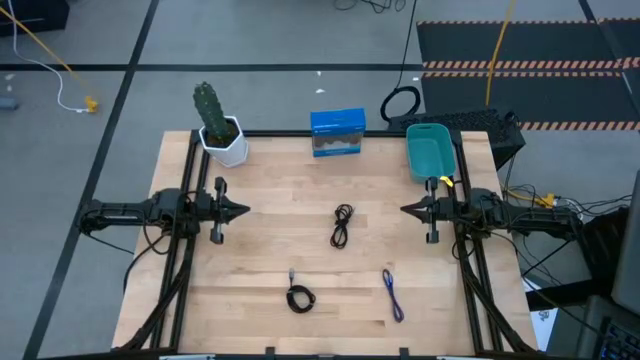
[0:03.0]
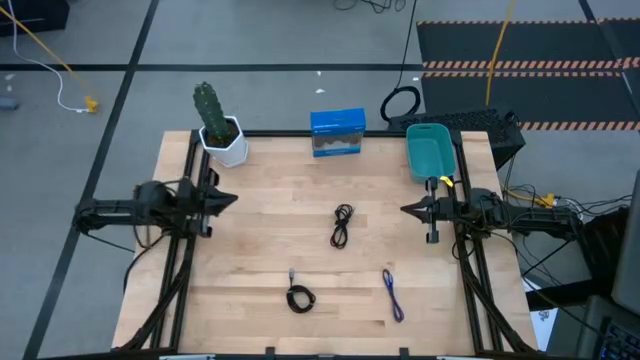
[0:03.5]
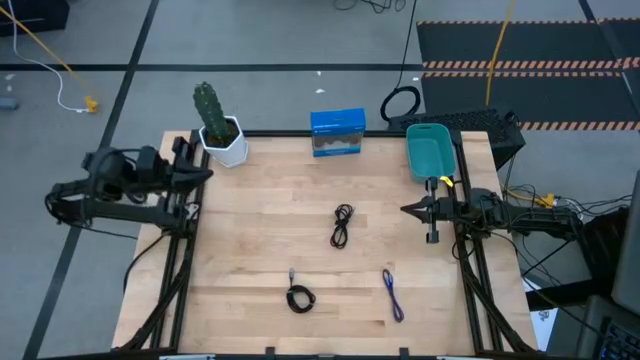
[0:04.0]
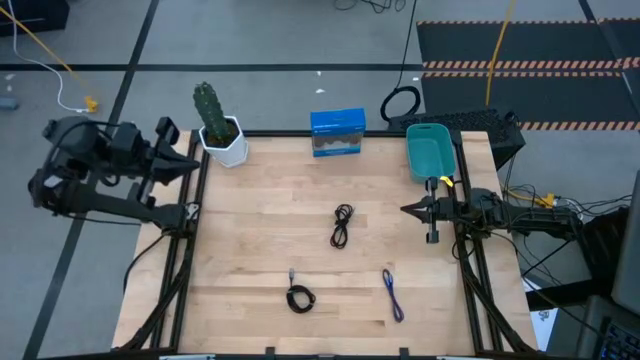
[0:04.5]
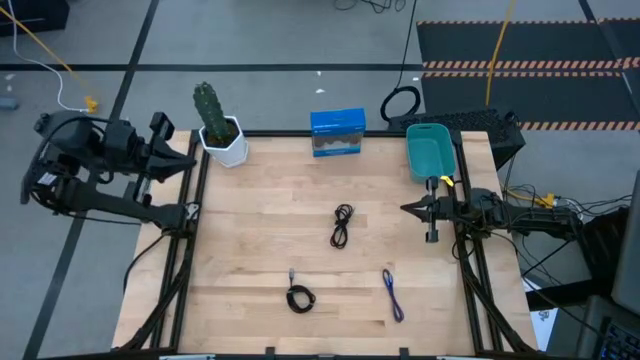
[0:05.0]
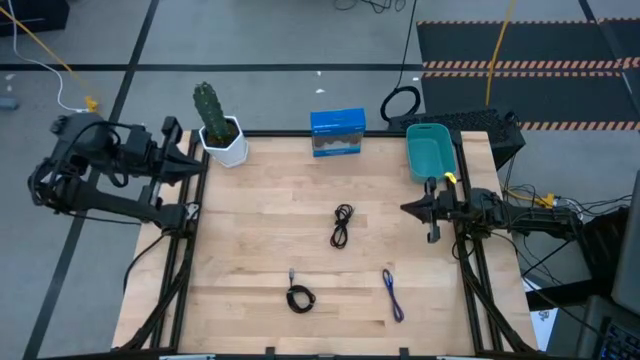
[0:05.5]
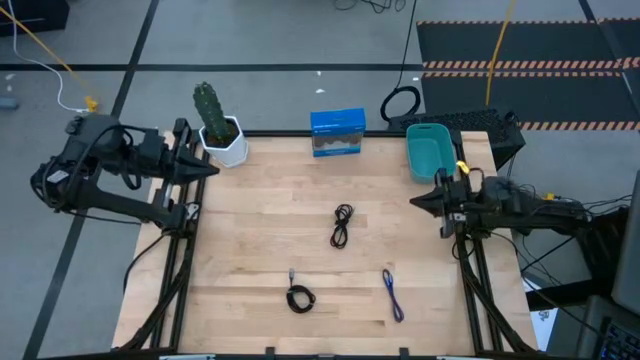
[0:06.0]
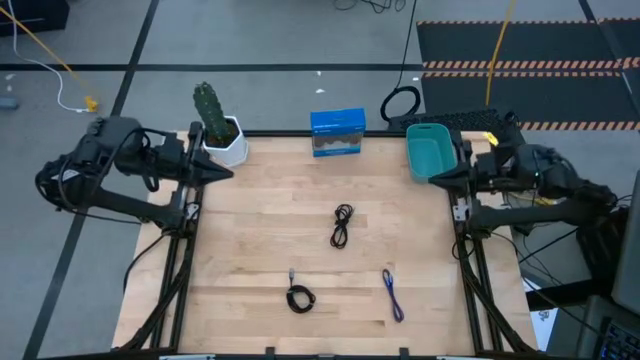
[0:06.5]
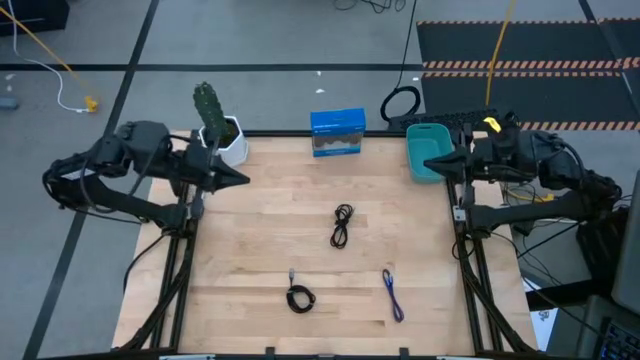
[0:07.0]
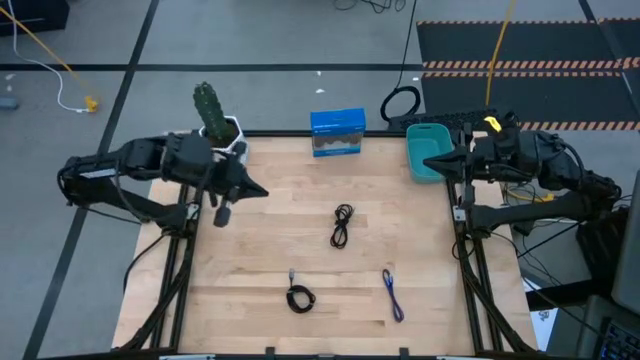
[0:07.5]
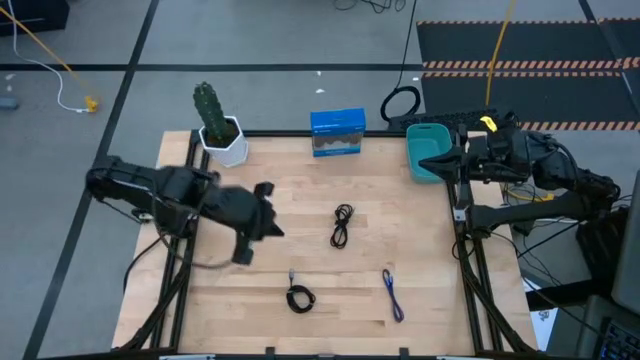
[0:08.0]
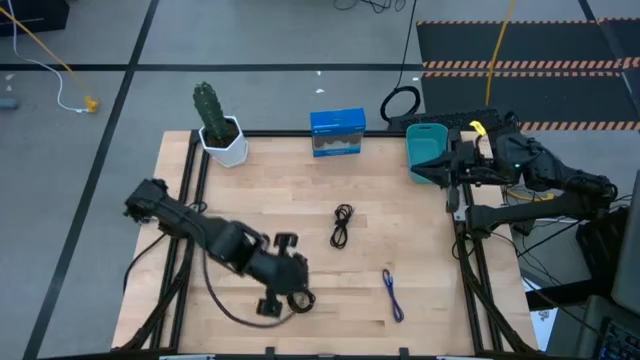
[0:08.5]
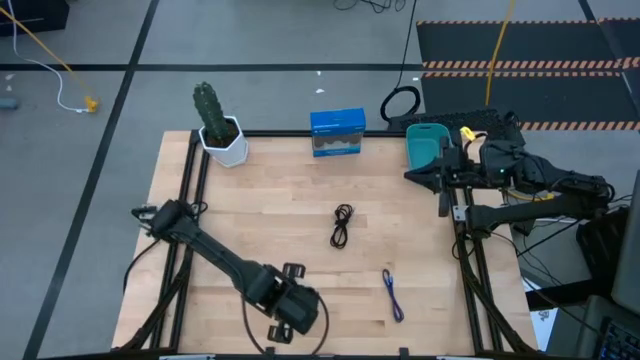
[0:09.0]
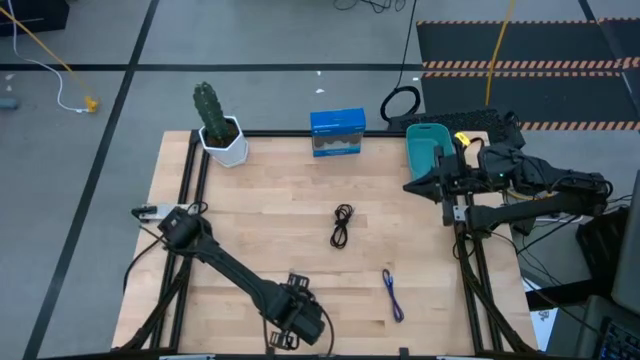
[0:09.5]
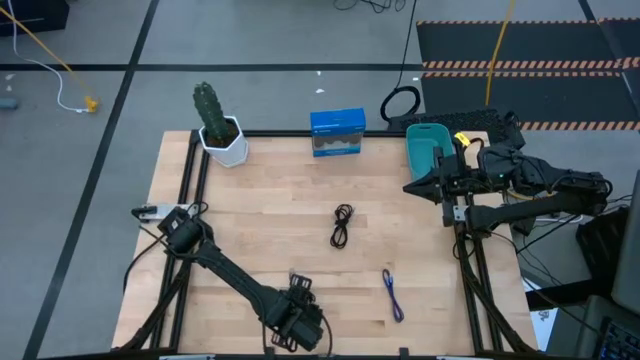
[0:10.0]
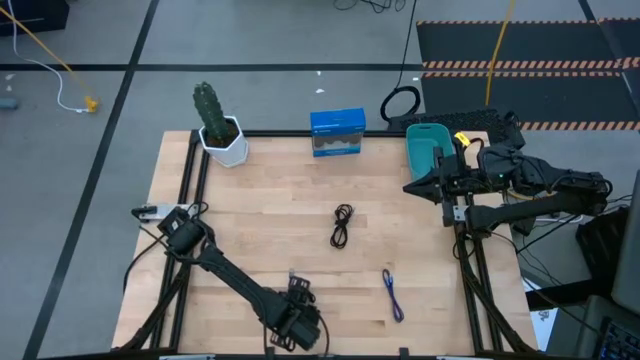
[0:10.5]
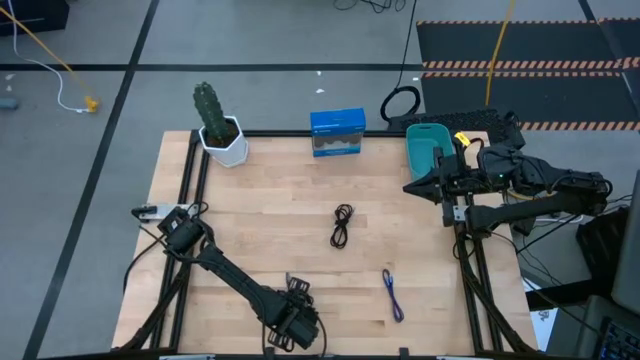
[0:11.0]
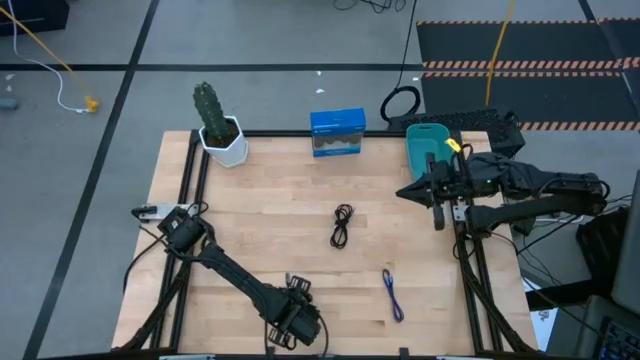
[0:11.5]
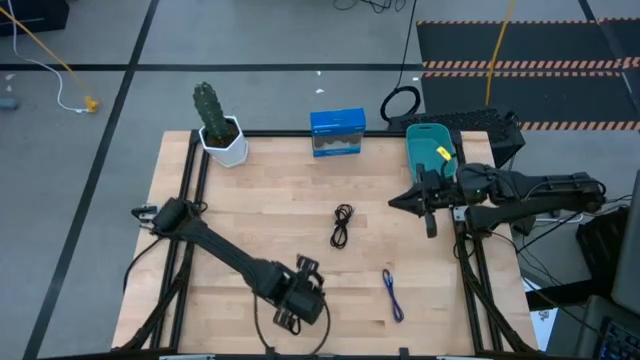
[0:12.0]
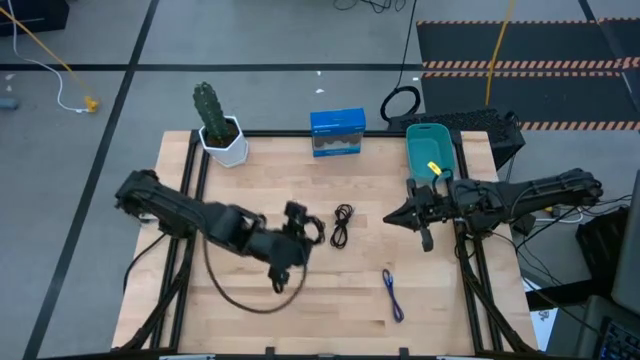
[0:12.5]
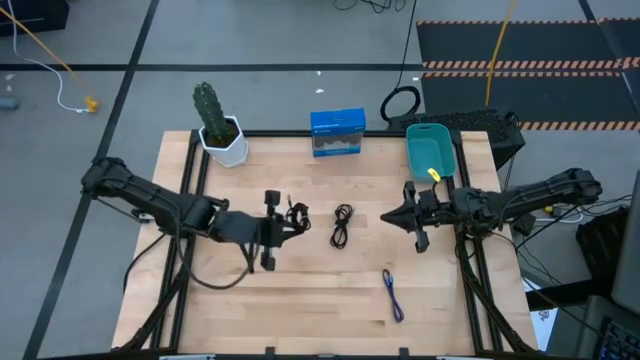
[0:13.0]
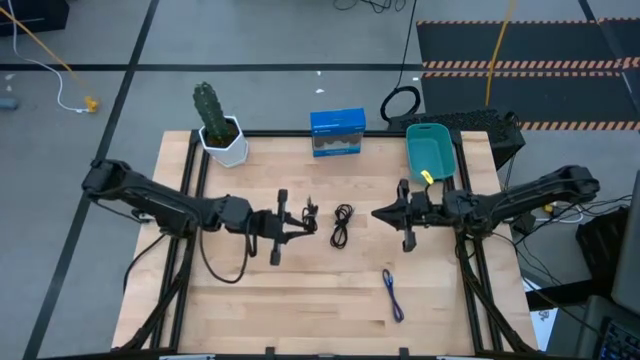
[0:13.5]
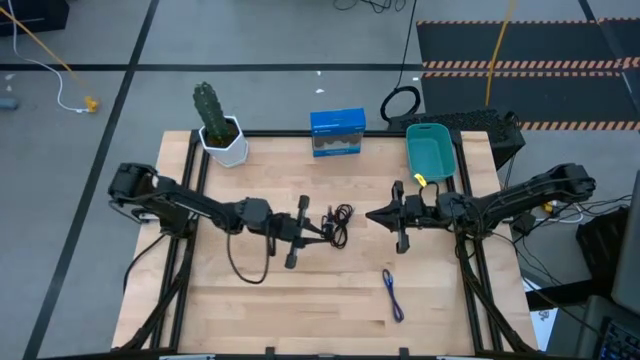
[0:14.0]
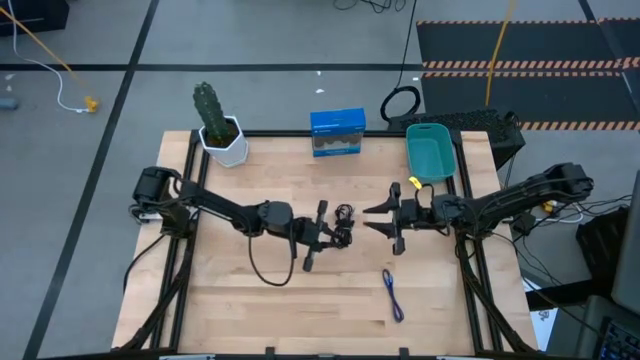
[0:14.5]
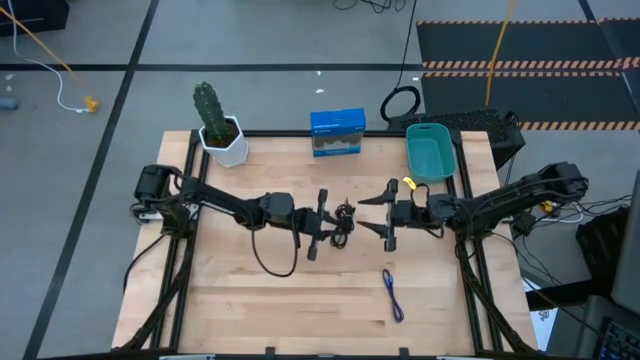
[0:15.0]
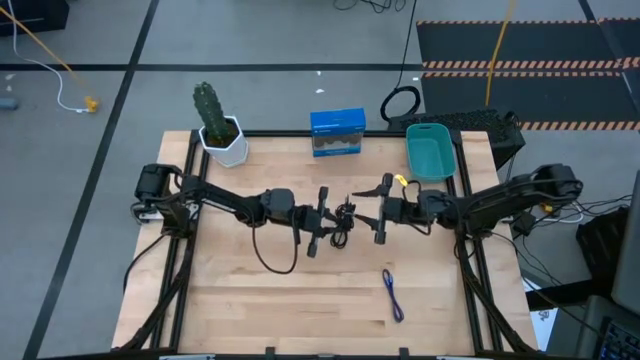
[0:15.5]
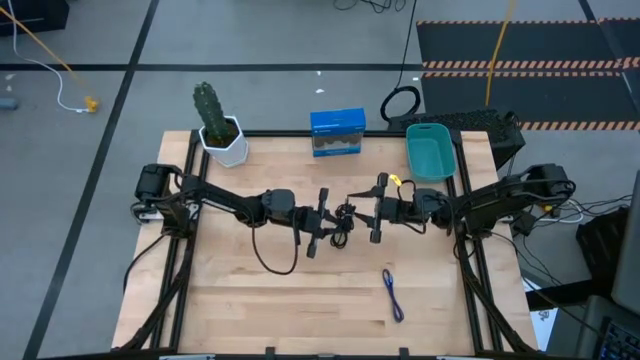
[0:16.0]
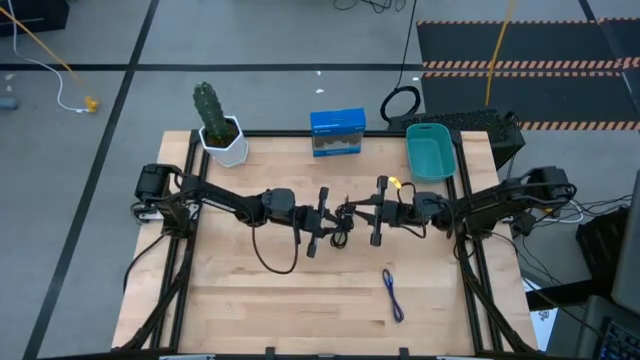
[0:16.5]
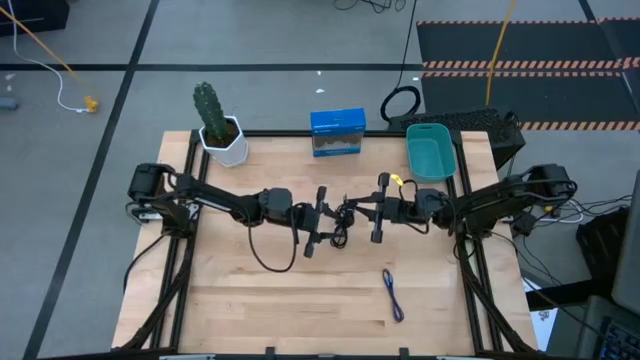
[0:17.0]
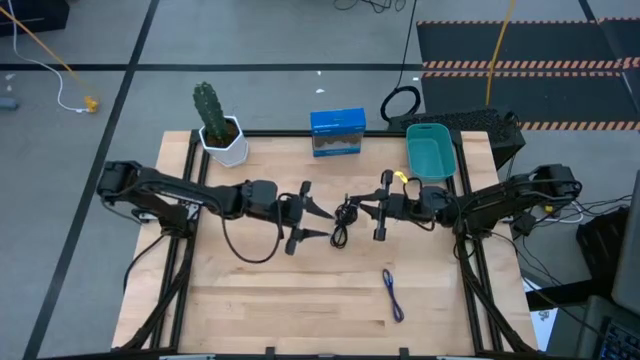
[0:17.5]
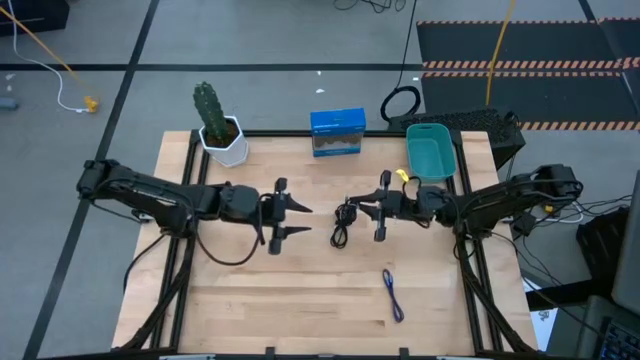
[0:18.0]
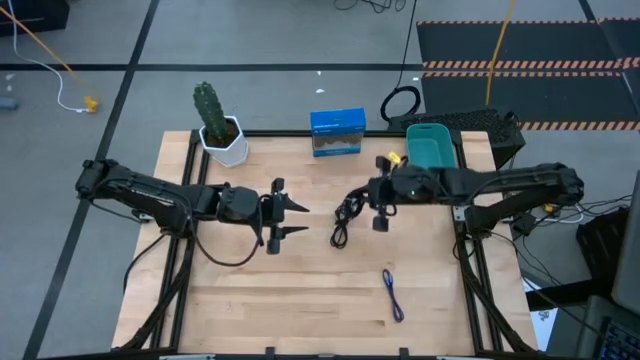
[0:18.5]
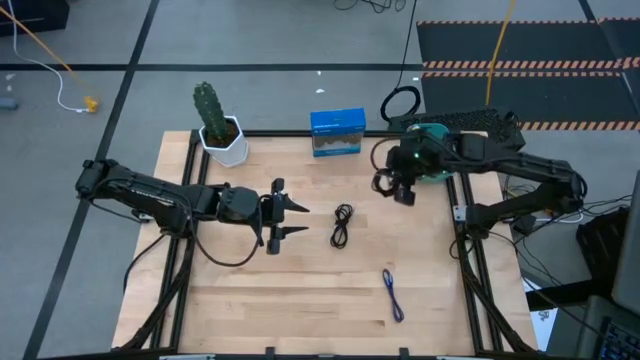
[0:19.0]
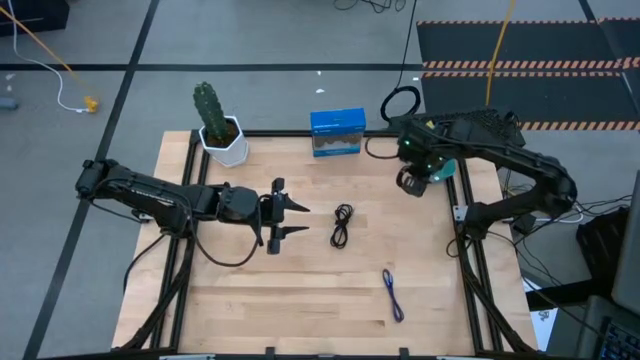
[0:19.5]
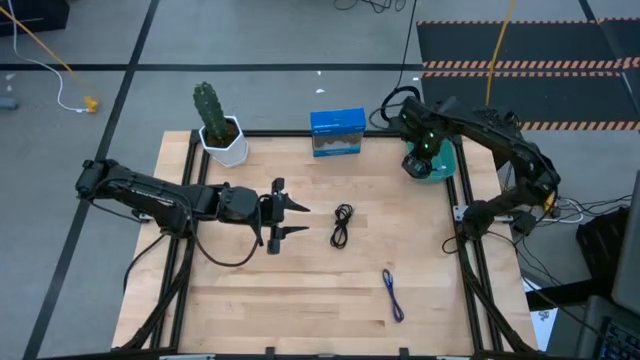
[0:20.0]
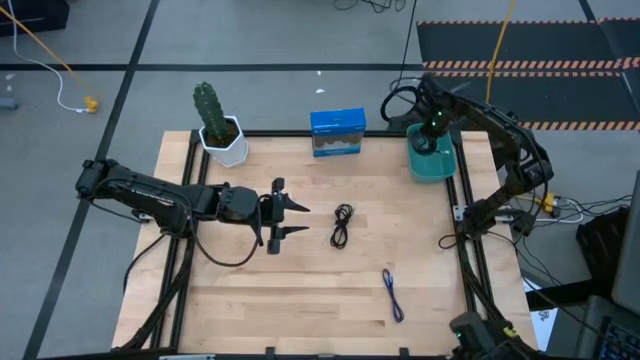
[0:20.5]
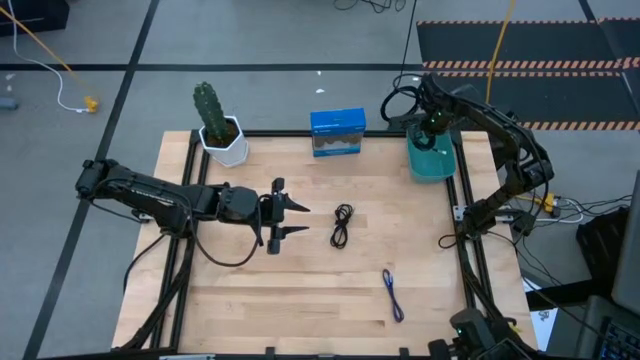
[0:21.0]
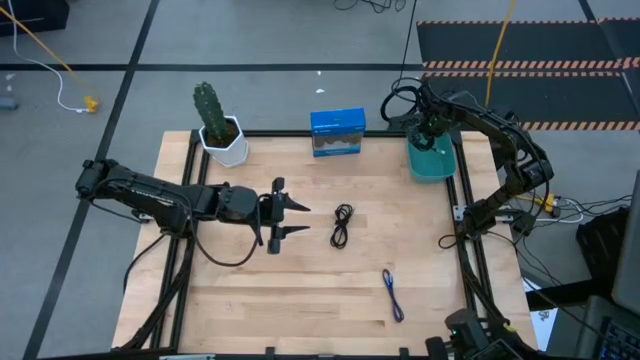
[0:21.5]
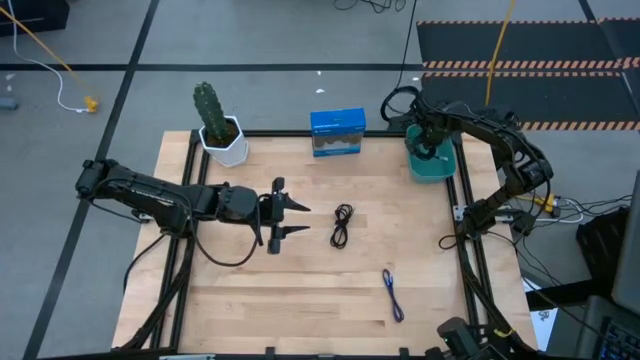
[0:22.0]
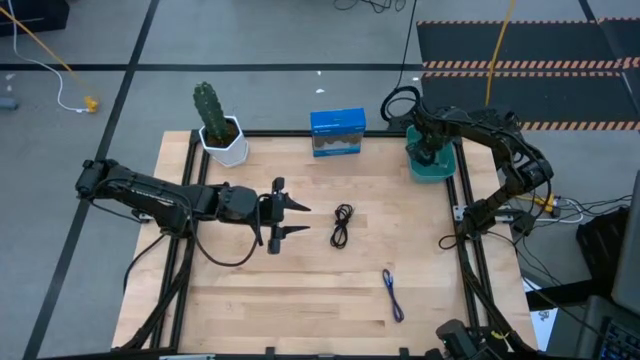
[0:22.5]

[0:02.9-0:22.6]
Task: Pick and place USB-C Cables
Put the bottom black USB cable into the blue bin
